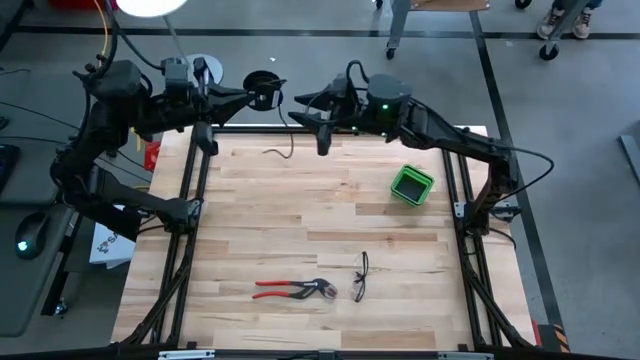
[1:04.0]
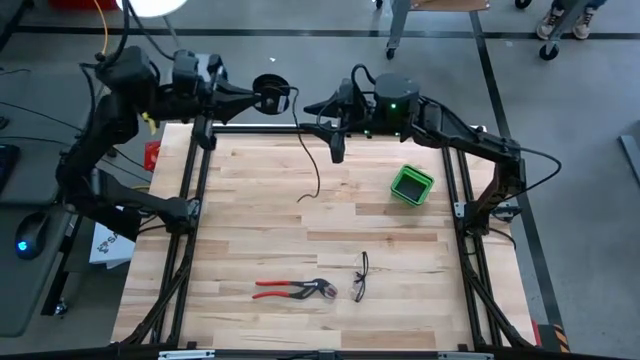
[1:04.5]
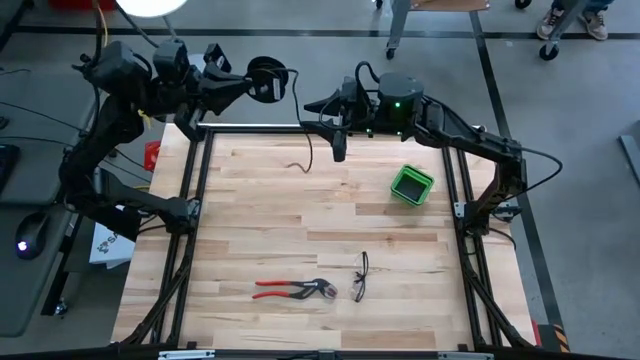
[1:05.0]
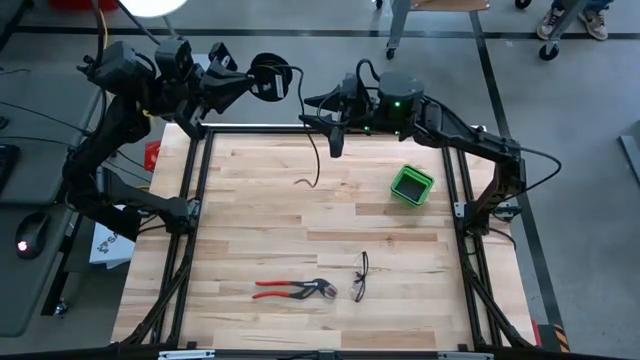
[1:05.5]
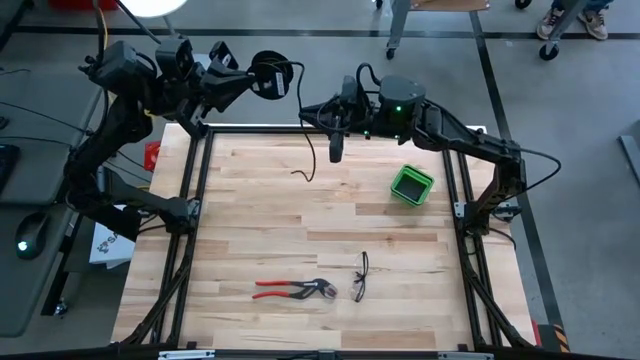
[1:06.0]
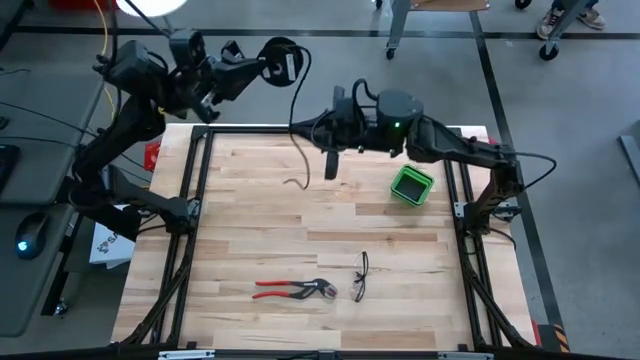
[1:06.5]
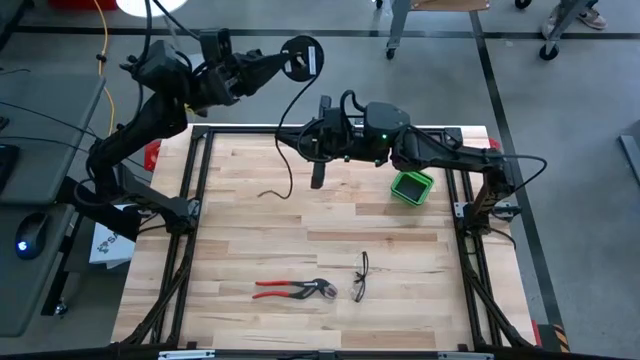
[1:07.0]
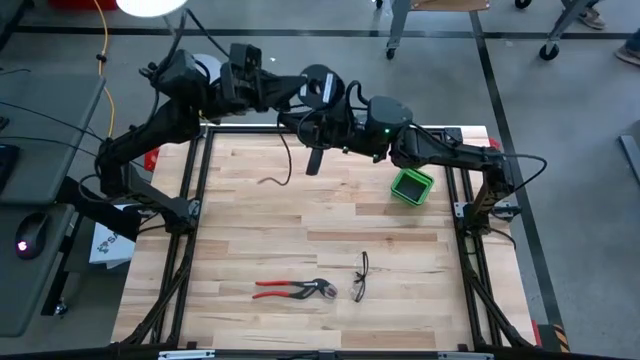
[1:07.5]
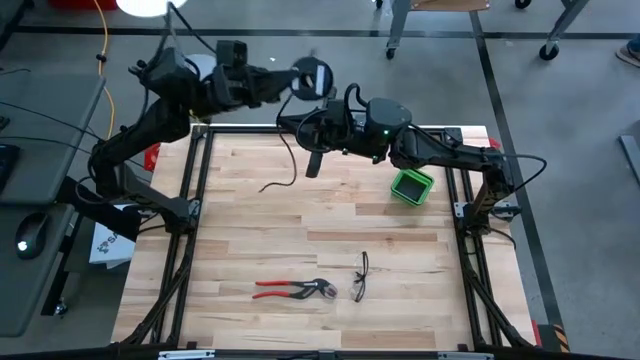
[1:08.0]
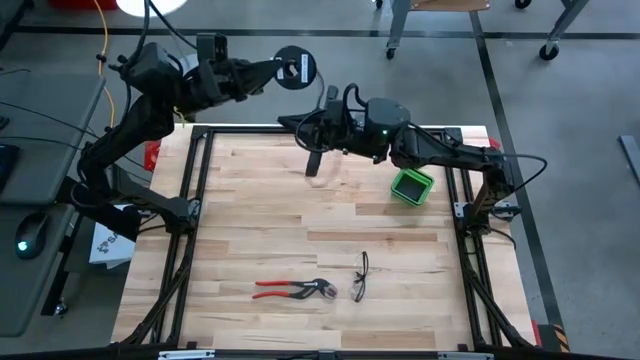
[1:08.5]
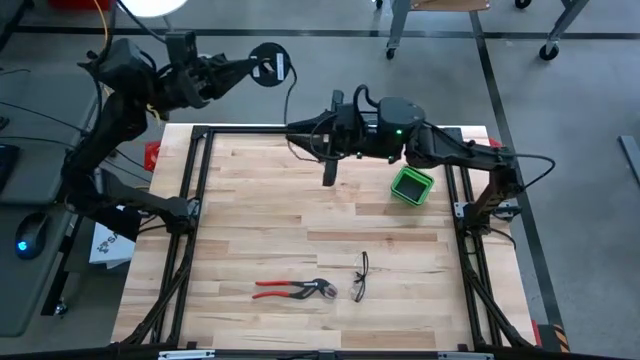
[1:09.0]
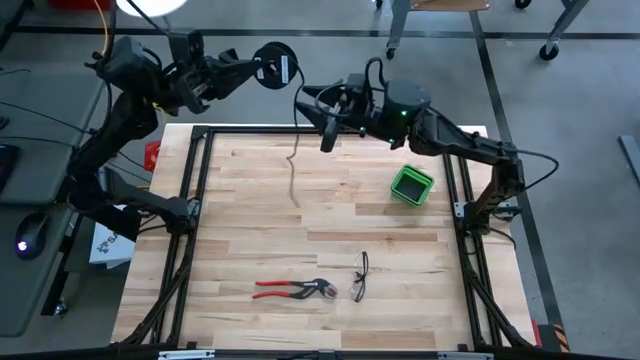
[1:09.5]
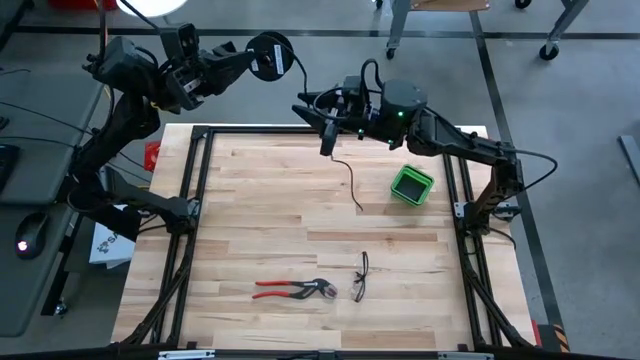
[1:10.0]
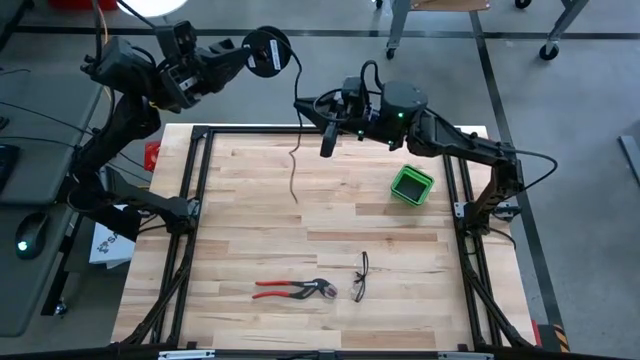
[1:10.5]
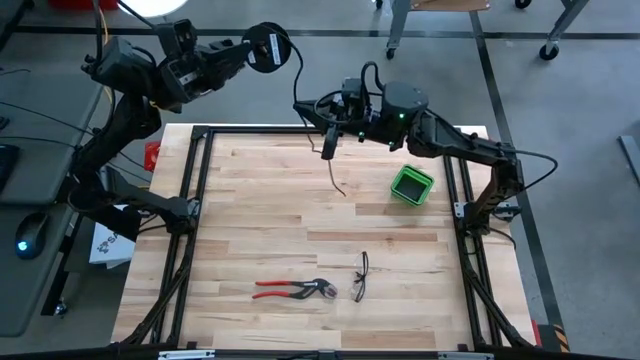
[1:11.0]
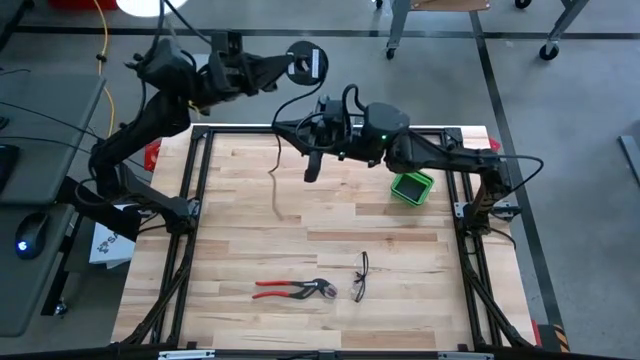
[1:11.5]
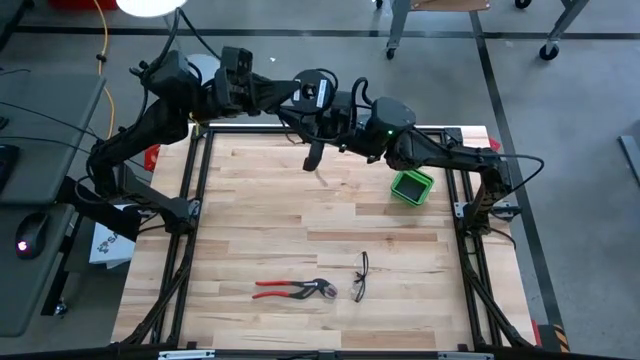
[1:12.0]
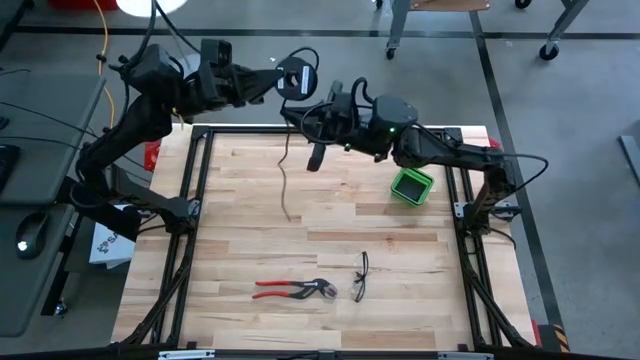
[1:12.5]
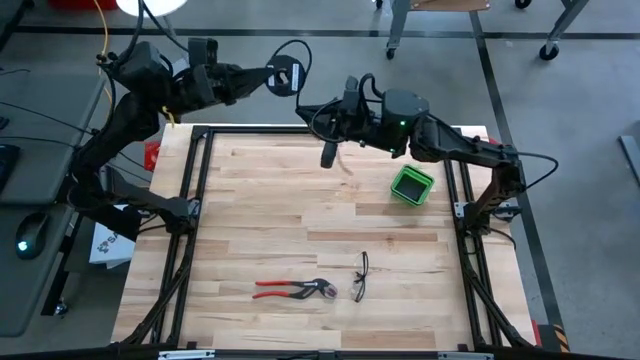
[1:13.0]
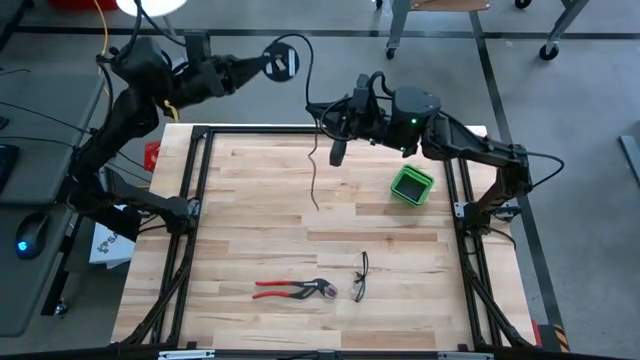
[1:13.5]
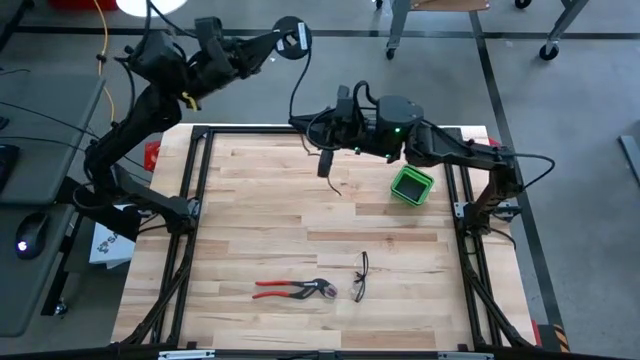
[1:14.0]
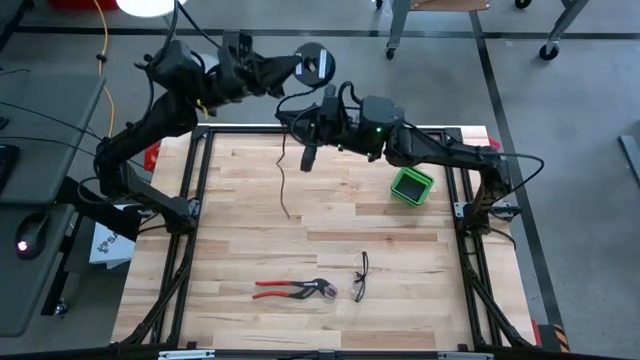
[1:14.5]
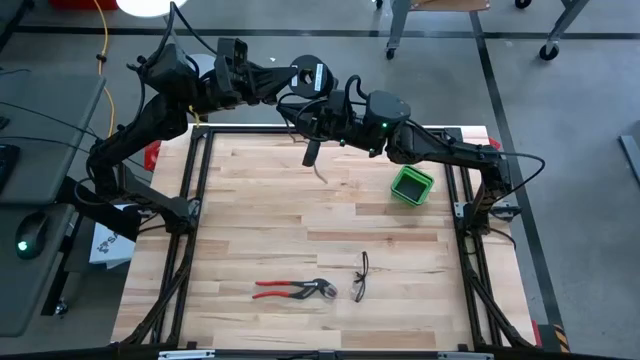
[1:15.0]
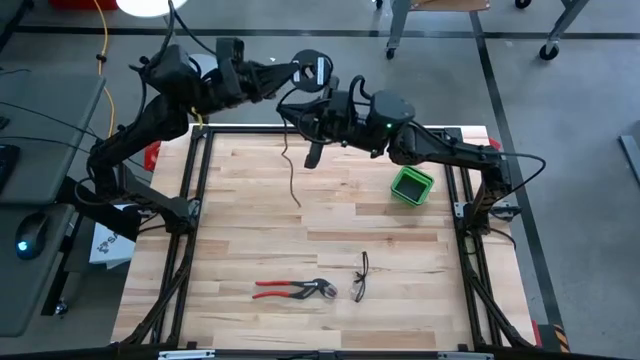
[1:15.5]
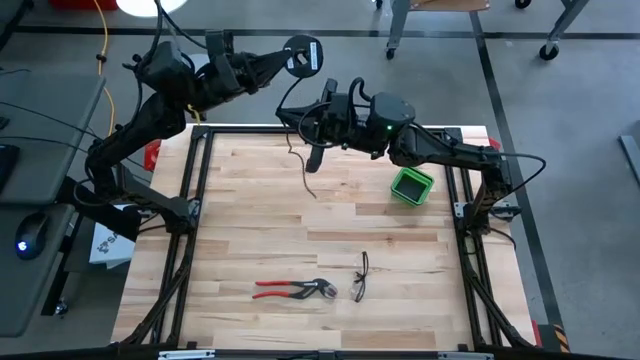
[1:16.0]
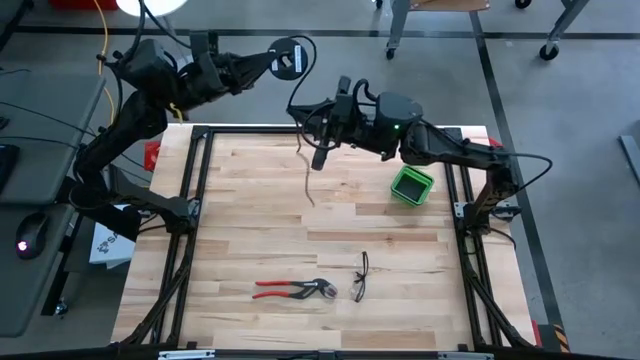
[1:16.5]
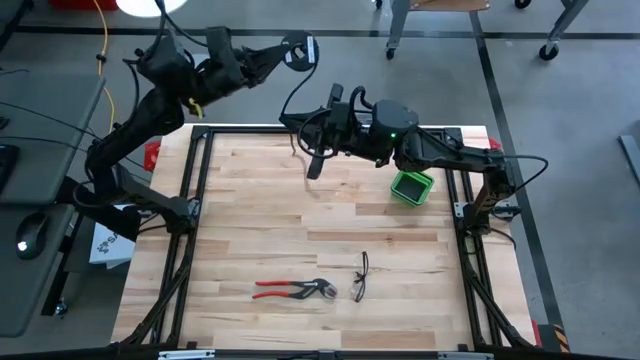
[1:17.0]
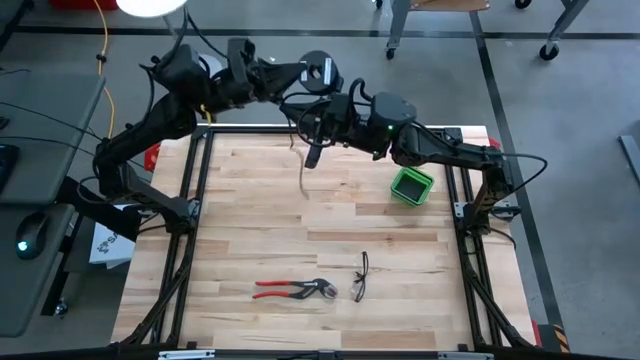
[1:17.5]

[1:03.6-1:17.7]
Task: Coil cords
Coil the black wire on the black spool

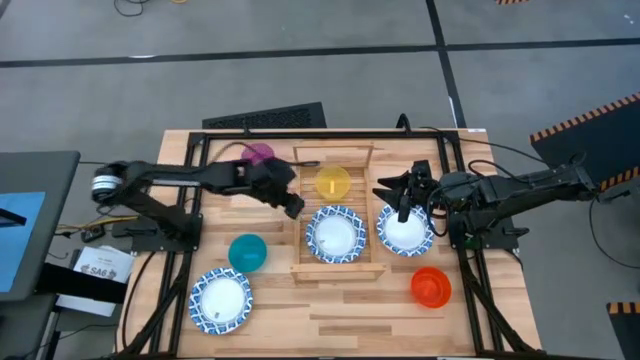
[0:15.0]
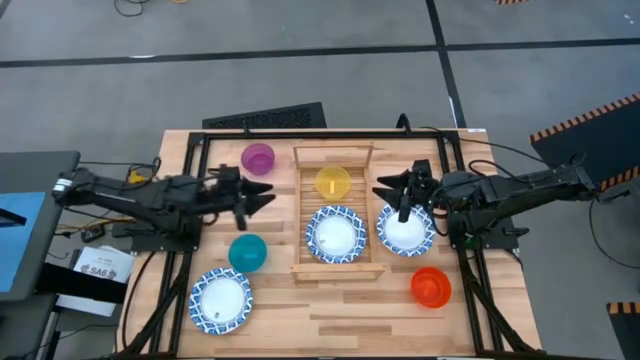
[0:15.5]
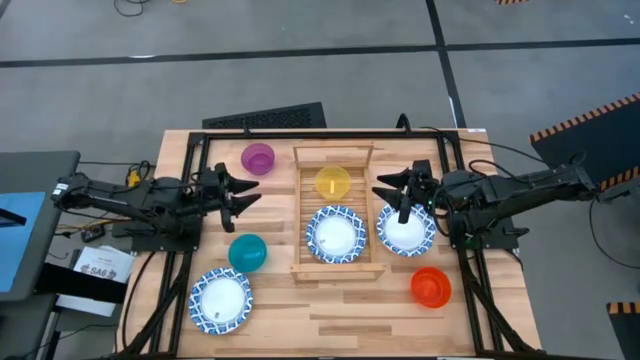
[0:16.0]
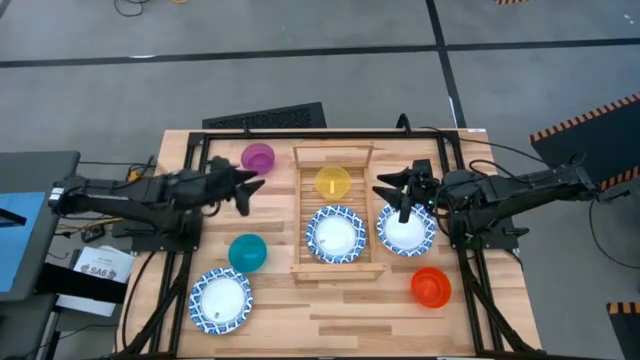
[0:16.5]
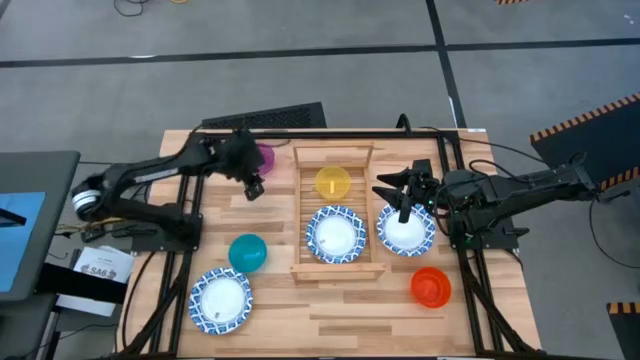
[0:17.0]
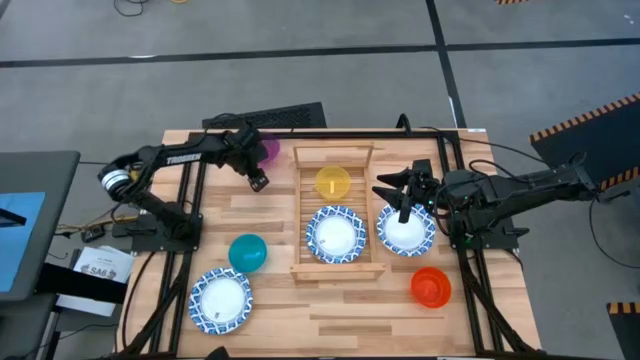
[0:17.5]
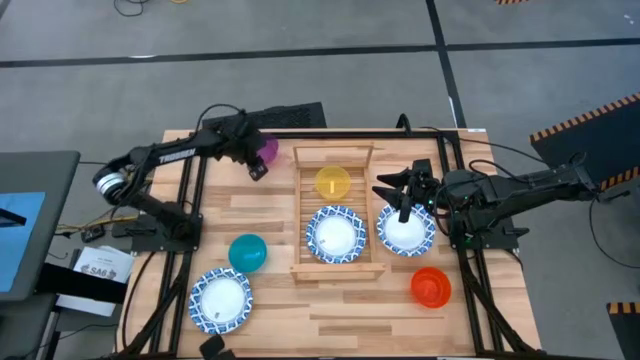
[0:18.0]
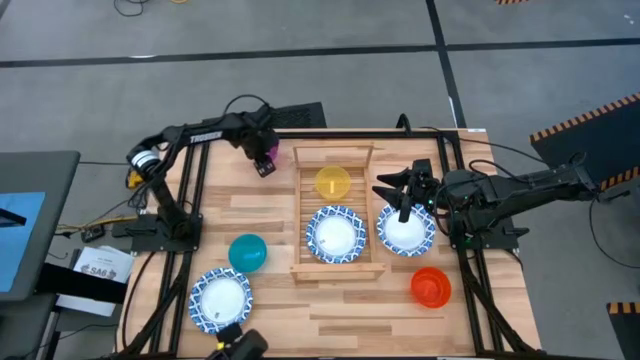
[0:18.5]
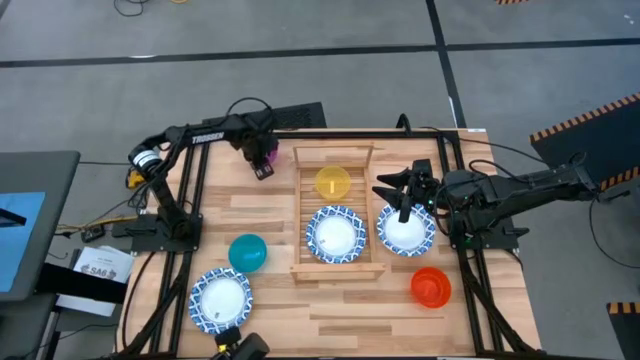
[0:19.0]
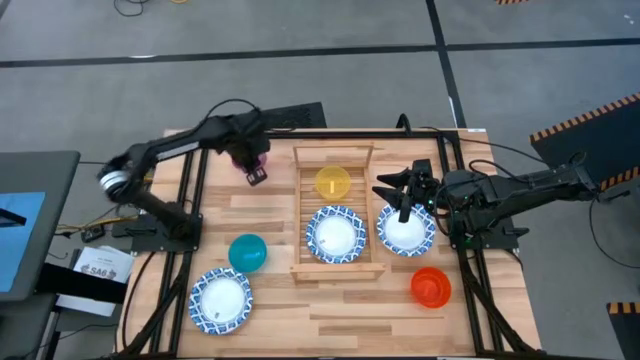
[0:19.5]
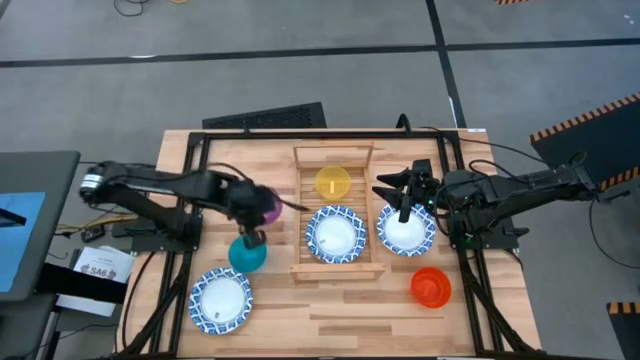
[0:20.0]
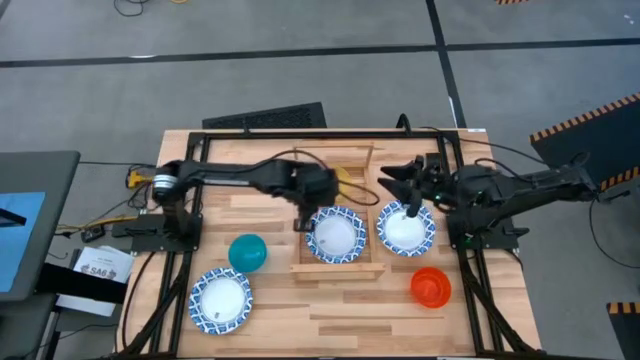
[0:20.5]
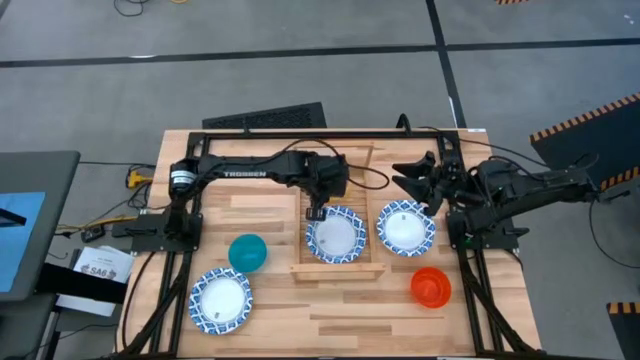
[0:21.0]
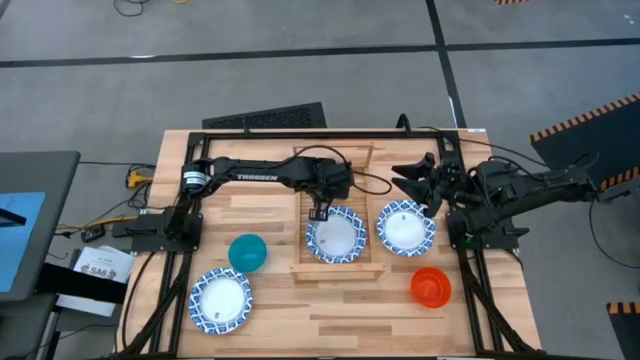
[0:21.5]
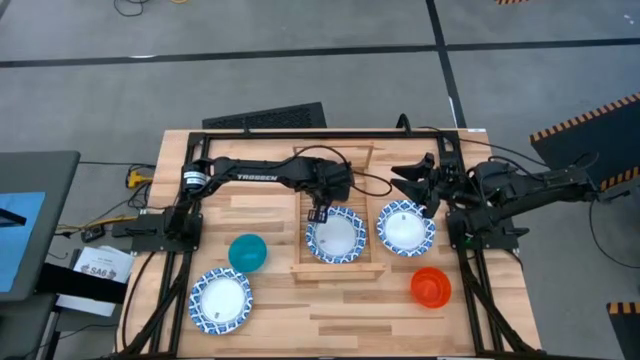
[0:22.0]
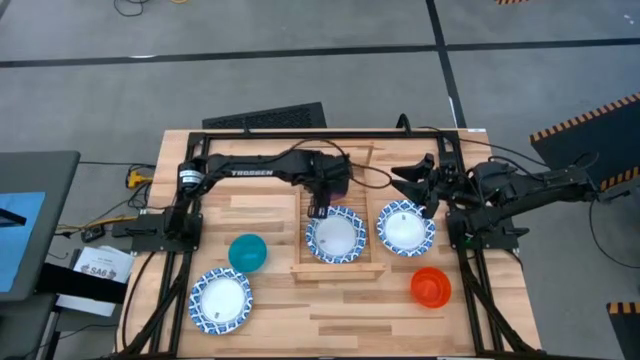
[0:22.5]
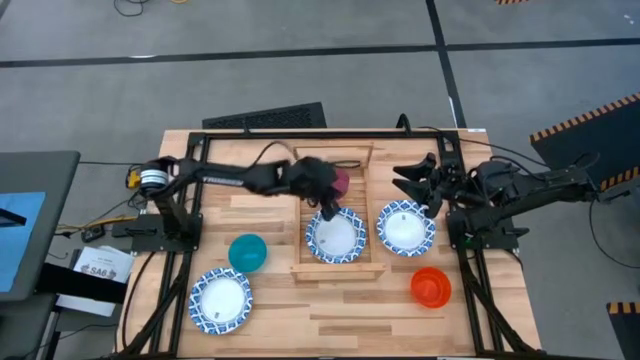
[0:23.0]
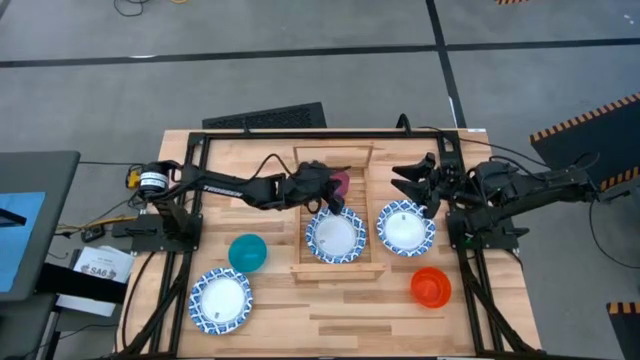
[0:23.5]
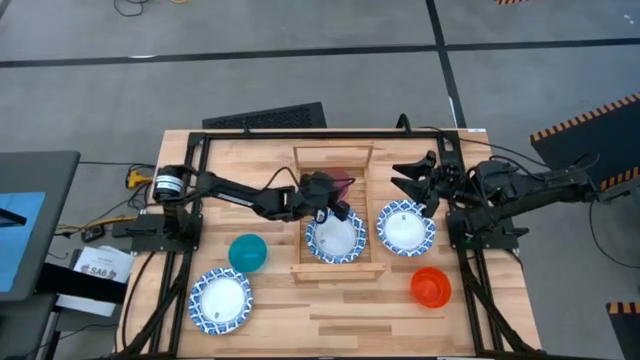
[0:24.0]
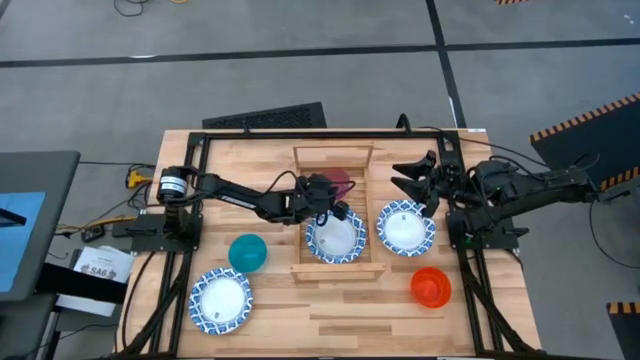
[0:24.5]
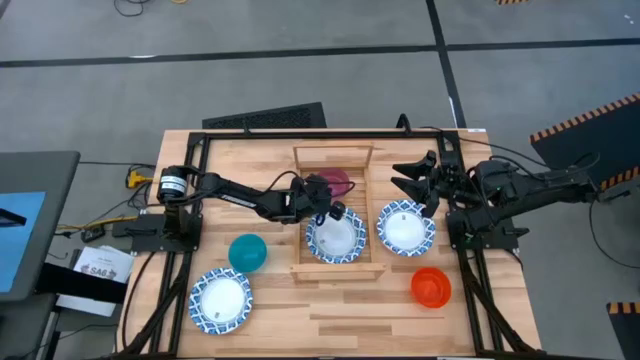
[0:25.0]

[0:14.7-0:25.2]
Task: Place and stack bowls onto a shelf
Stack the violet bowl on top of the yellow bowl on the shelf
